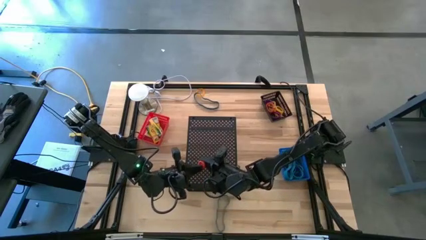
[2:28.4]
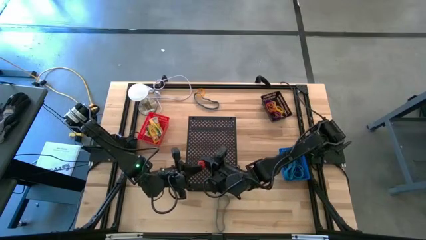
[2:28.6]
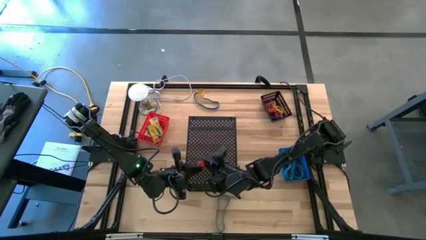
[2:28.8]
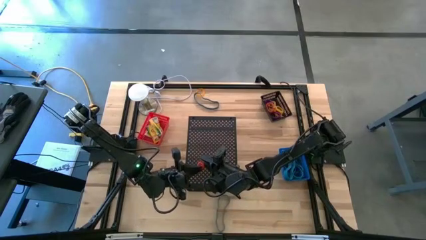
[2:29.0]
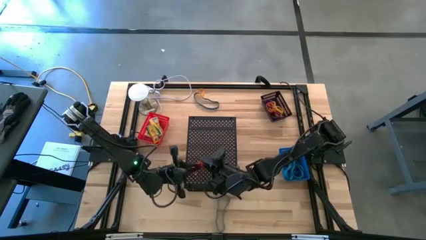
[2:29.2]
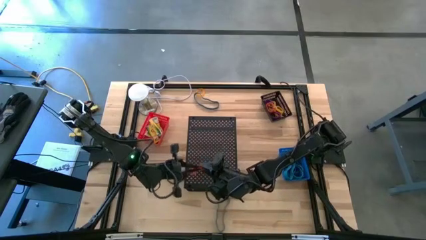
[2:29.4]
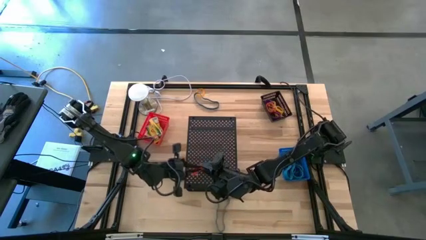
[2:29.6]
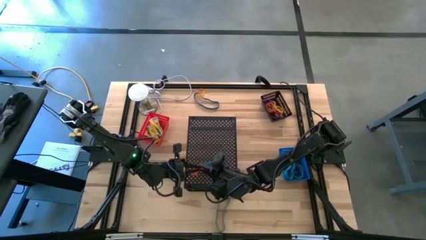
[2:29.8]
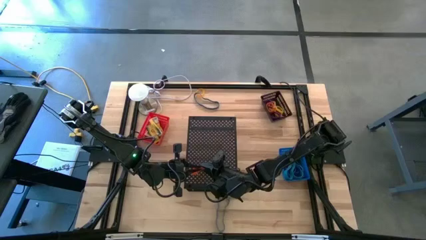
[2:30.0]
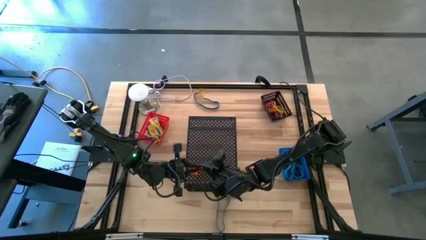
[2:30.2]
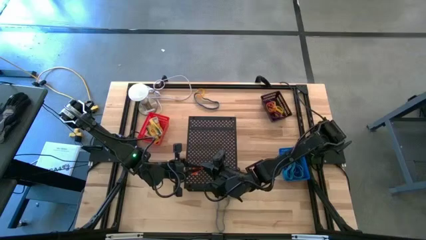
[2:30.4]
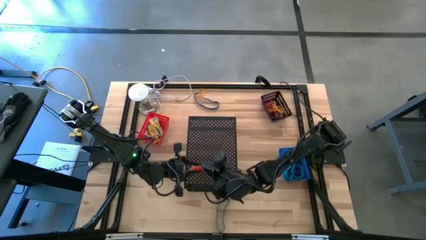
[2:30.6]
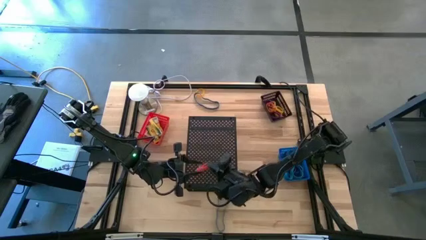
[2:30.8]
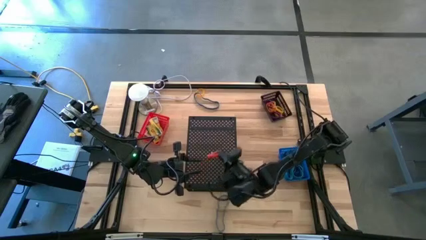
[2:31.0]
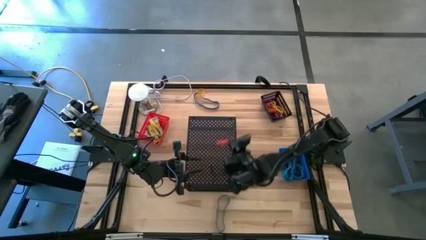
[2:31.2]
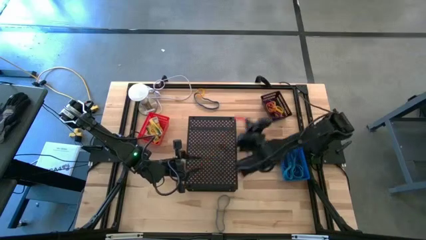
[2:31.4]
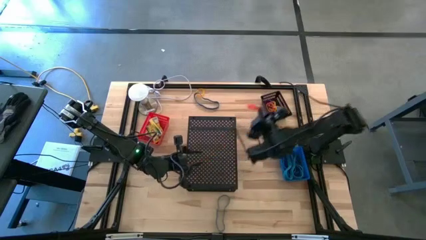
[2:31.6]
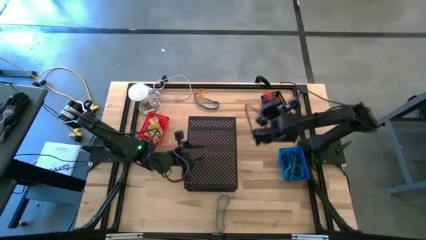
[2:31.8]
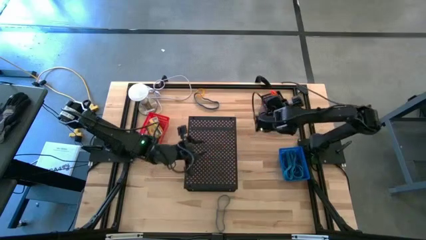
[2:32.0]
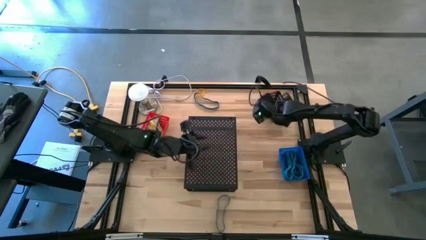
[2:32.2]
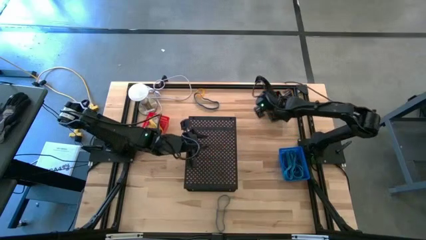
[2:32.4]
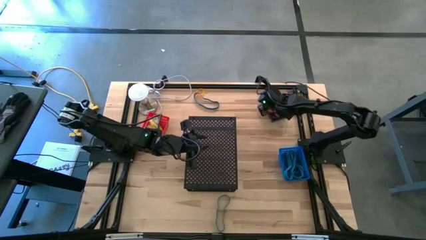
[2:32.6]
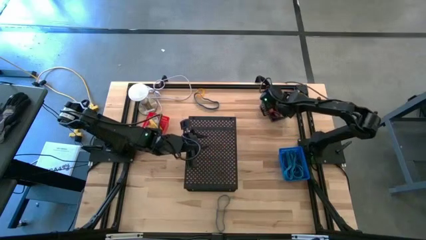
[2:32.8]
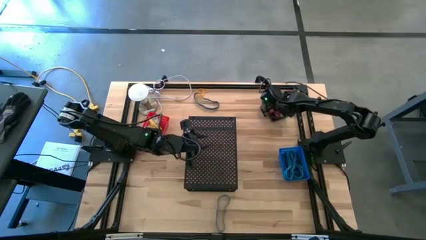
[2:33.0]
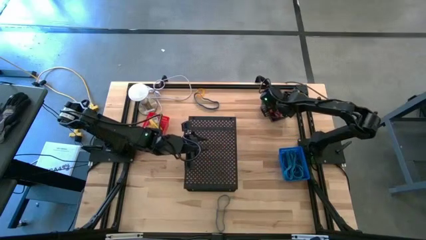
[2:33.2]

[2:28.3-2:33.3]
Task: Pick & Place Office Desk Supplies
Put the orange spring keychain into the black bin

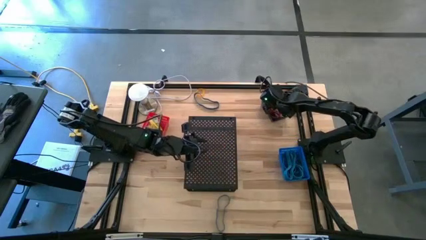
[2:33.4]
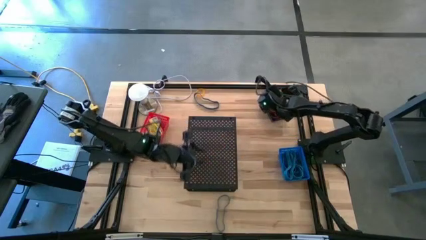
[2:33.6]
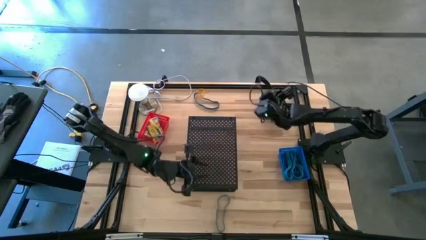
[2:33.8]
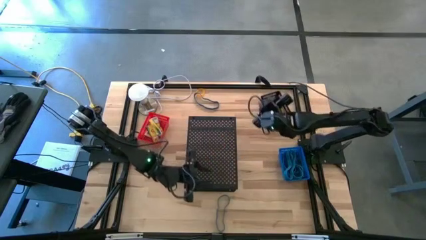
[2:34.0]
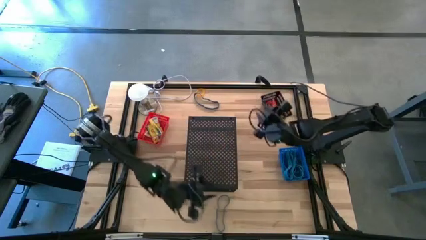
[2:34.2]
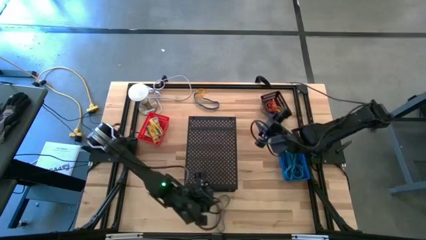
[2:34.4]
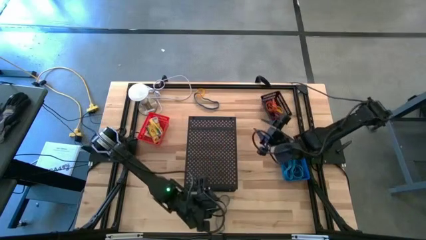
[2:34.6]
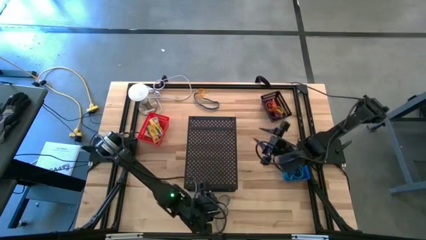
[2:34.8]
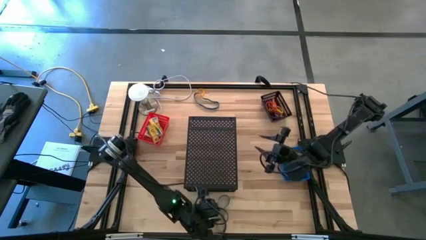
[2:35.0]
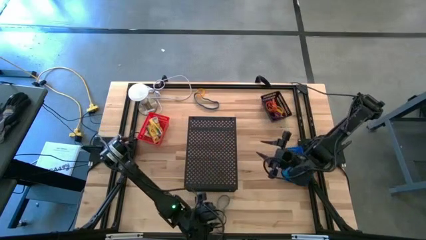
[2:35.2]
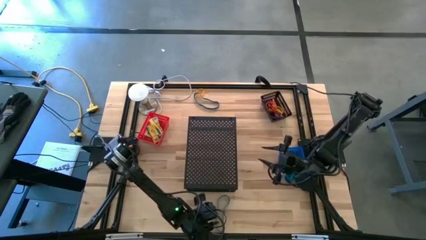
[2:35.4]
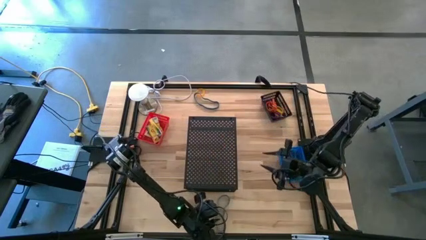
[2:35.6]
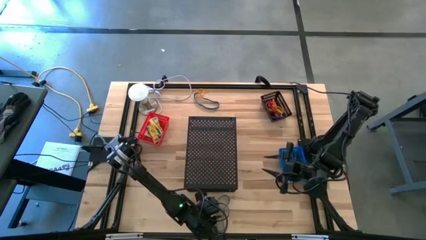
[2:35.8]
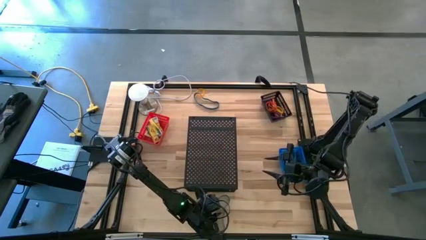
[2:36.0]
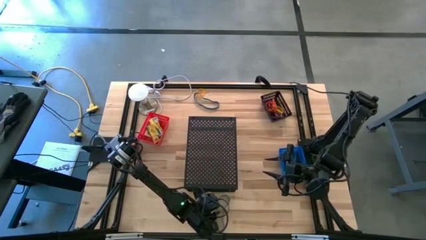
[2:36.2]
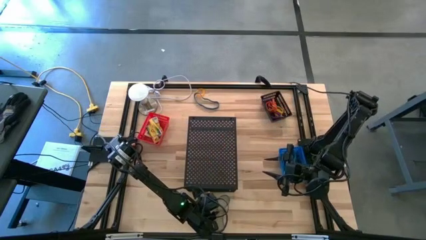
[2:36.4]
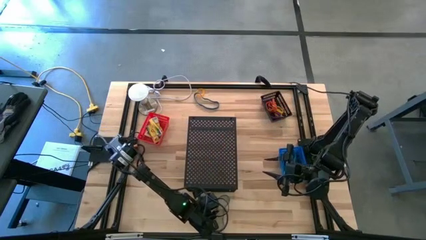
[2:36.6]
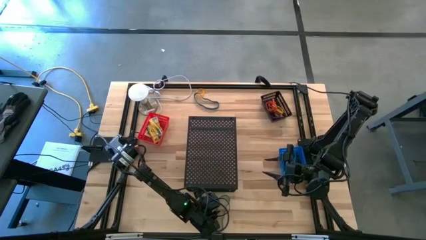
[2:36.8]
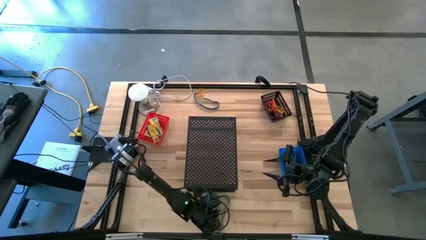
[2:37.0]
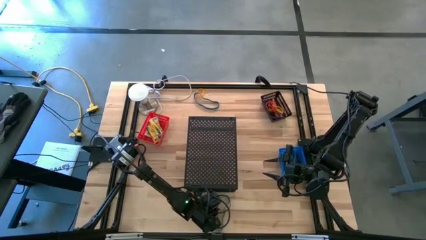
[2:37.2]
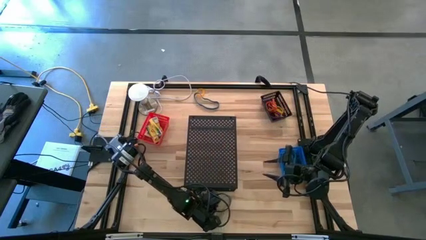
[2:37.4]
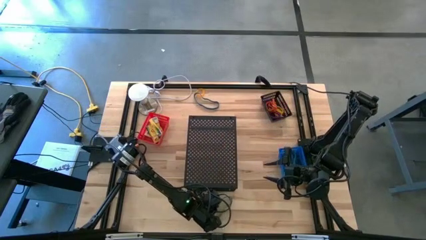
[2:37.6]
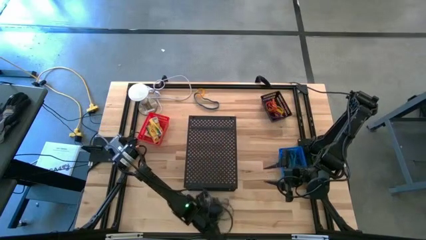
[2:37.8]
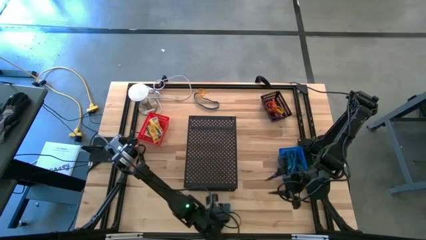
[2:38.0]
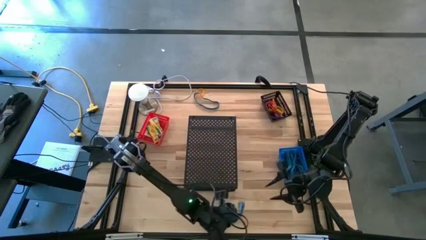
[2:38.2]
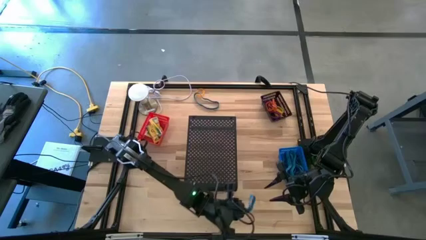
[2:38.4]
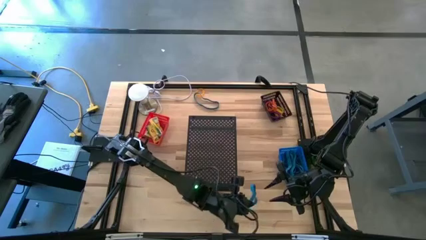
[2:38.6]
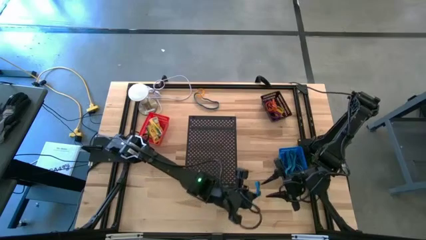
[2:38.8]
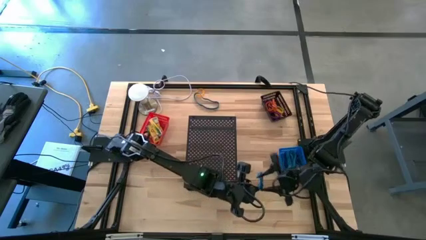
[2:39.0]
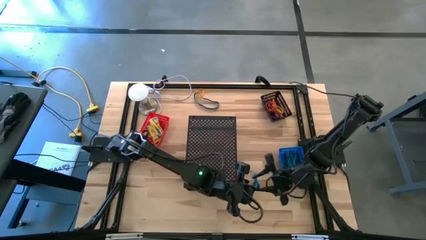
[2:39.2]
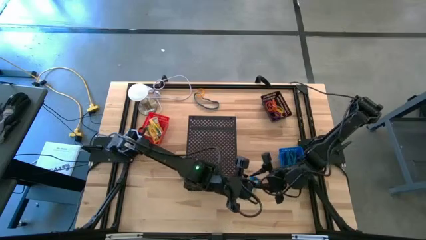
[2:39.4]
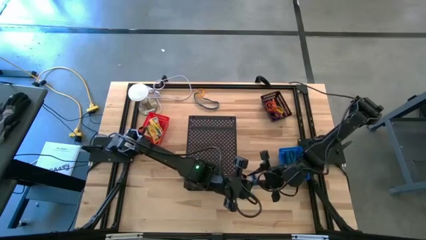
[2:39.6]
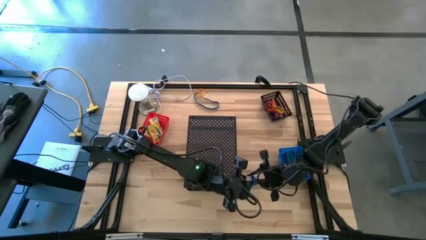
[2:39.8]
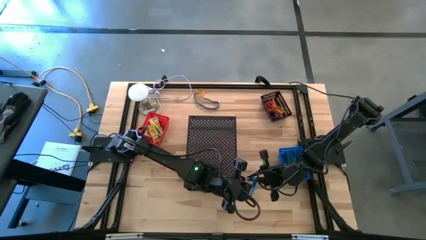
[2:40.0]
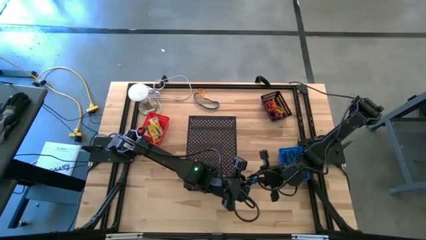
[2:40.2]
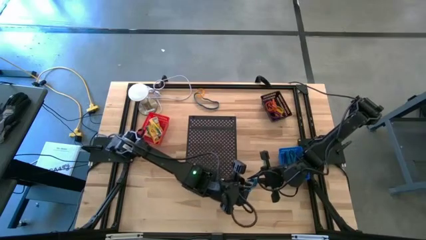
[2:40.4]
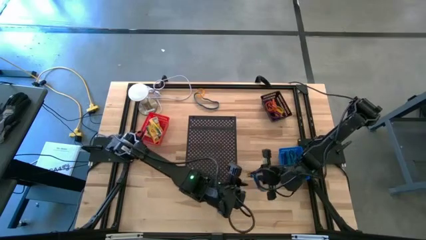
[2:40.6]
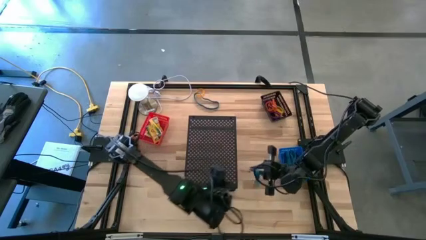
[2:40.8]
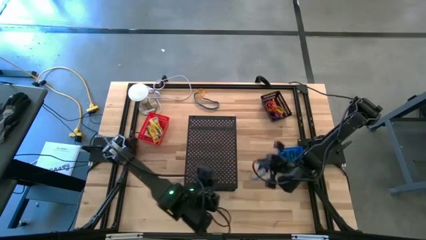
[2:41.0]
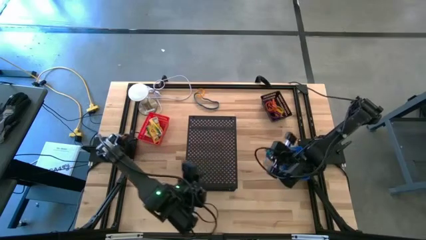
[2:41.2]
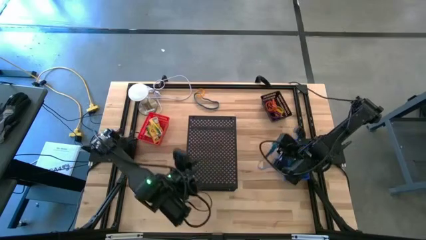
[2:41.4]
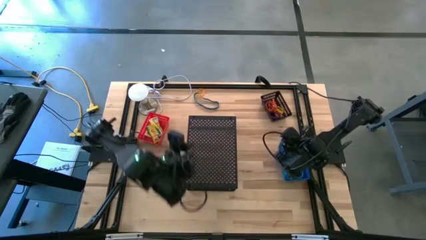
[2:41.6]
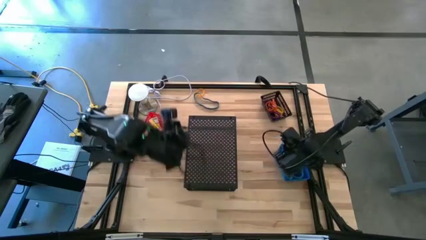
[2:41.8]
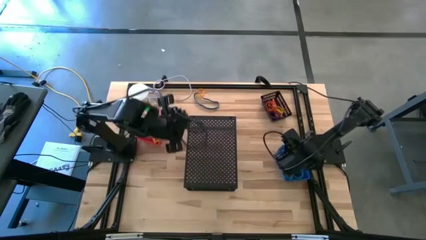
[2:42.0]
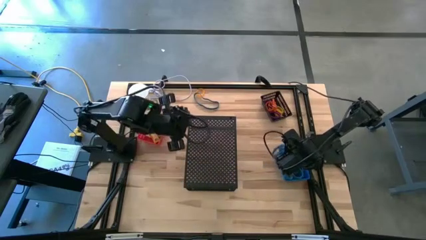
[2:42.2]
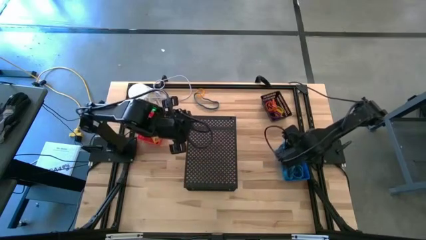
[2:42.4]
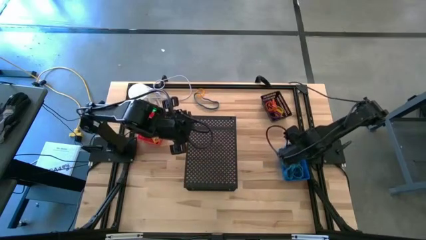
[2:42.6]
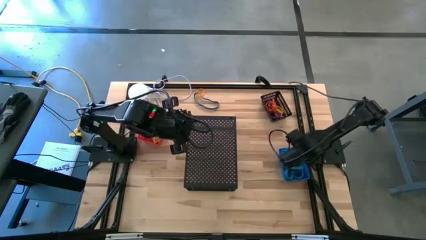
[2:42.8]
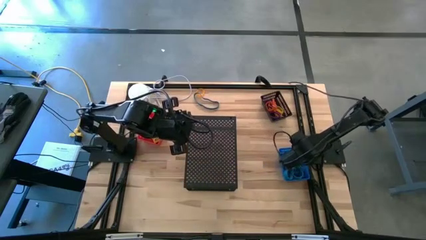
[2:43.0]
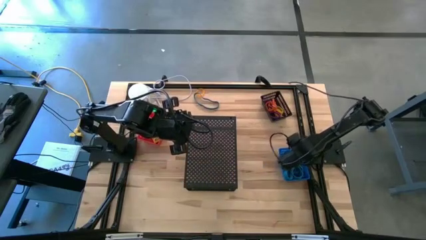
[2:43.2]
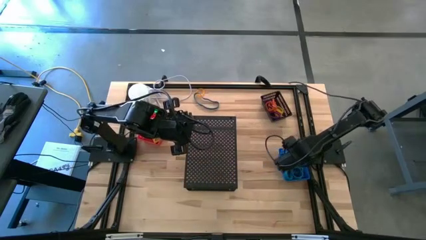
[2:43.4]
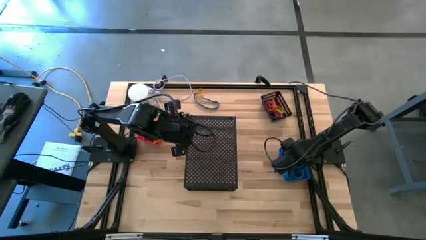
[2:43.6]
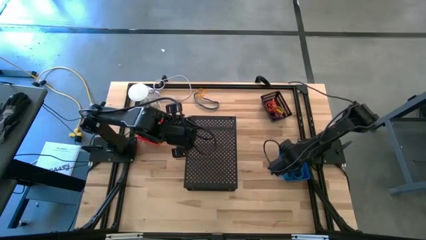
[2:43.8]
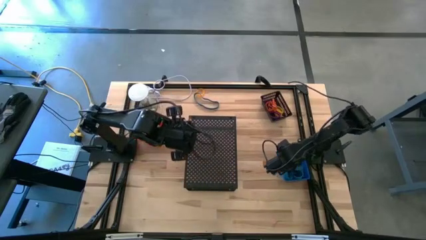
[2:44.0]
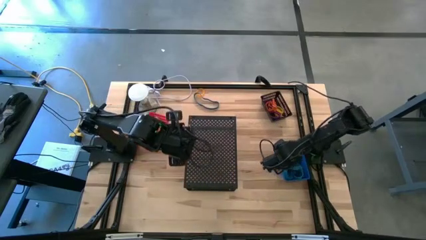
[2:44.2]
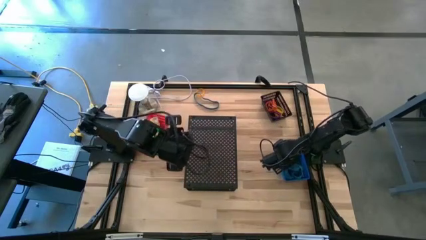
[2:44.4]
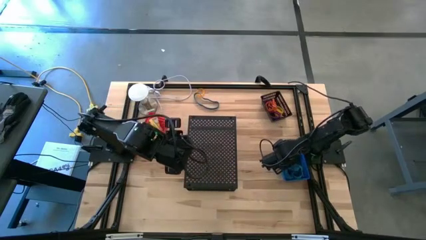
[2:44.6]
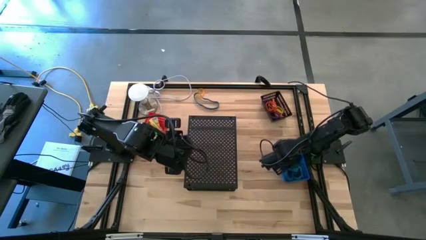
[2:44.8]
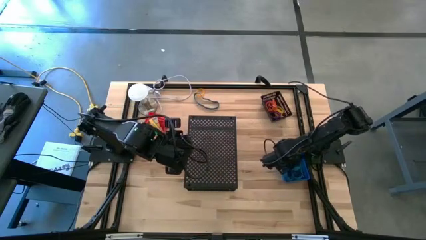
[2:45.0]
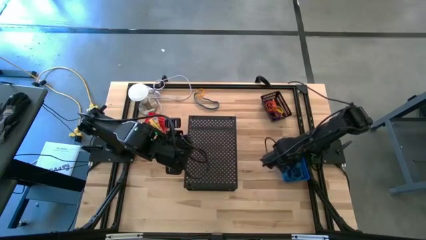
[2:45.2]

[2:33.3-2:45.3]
Put the blue rubber band into the blue bin
